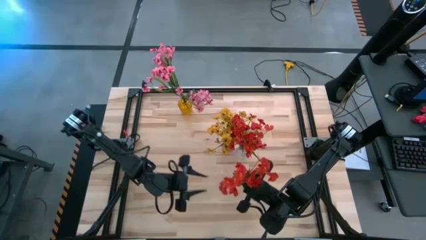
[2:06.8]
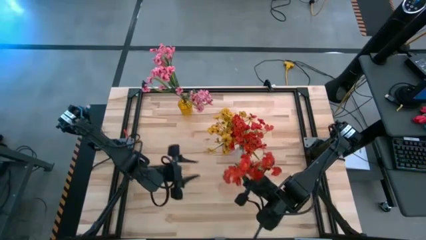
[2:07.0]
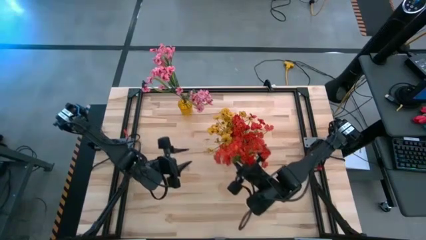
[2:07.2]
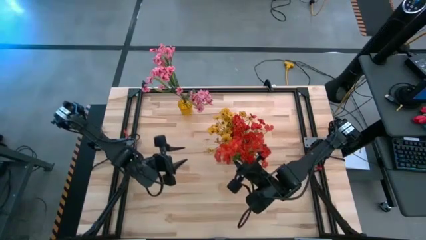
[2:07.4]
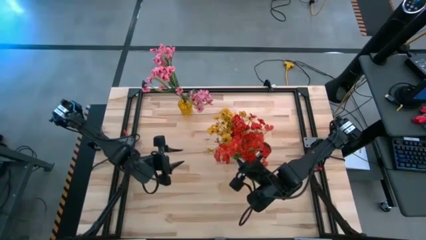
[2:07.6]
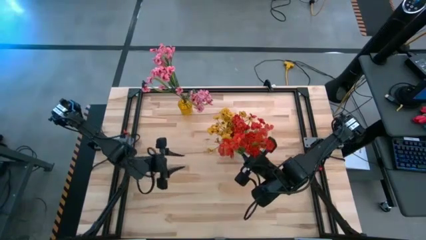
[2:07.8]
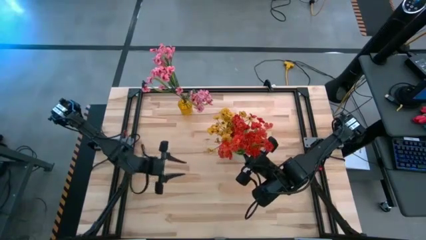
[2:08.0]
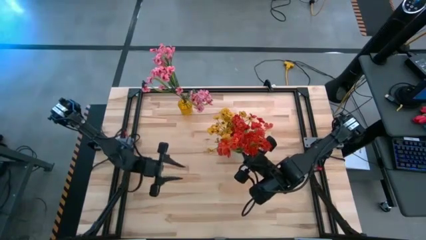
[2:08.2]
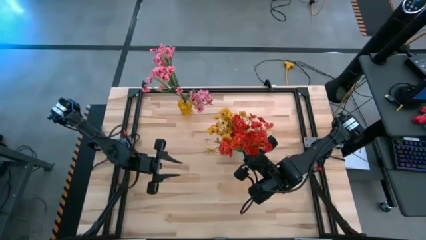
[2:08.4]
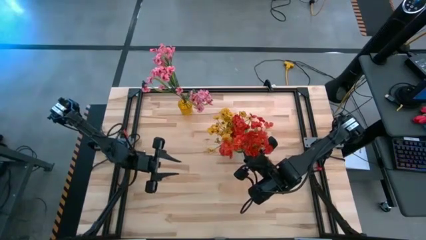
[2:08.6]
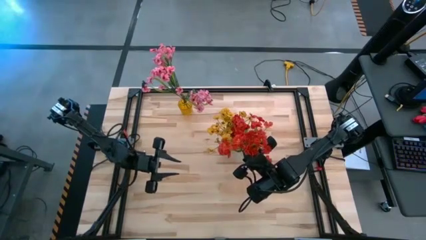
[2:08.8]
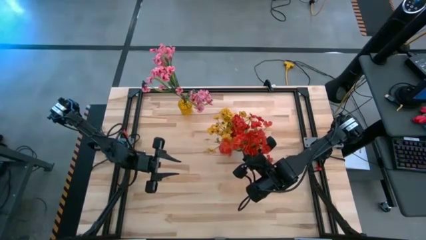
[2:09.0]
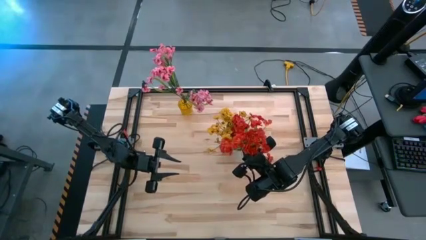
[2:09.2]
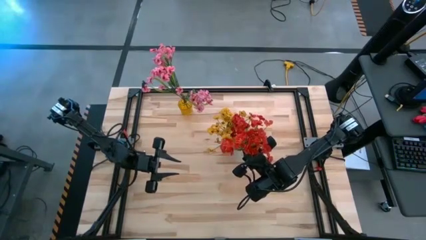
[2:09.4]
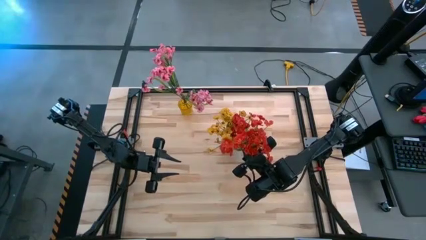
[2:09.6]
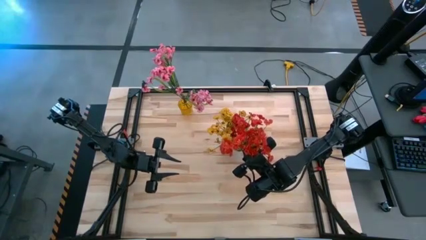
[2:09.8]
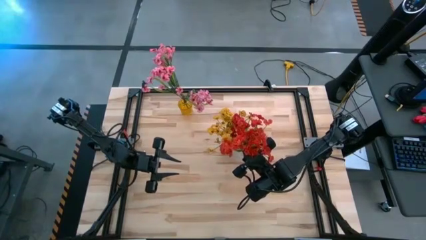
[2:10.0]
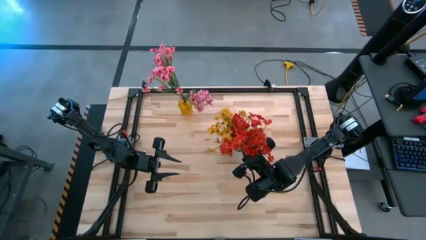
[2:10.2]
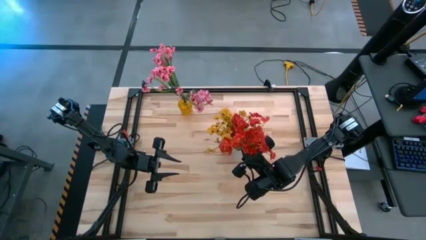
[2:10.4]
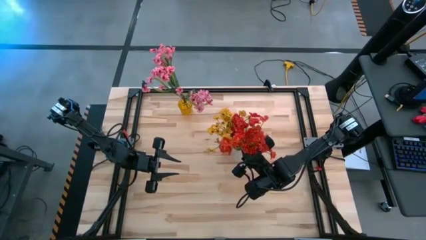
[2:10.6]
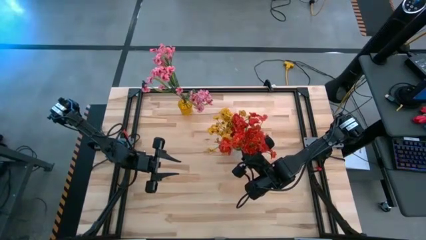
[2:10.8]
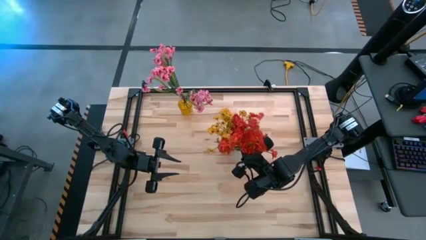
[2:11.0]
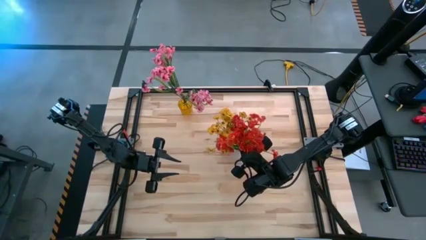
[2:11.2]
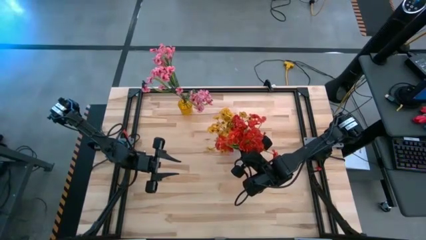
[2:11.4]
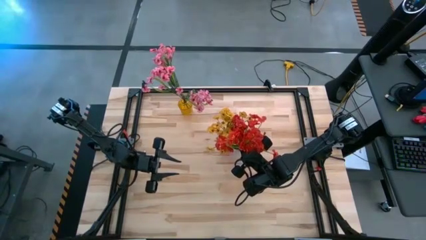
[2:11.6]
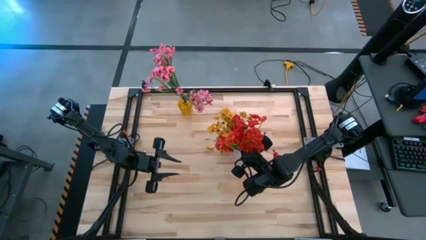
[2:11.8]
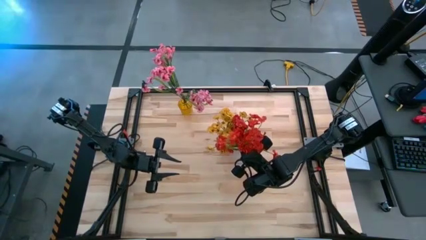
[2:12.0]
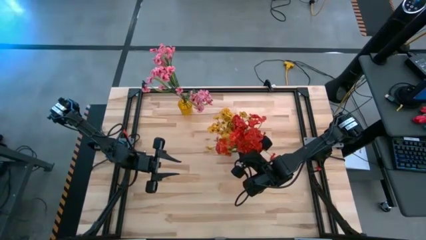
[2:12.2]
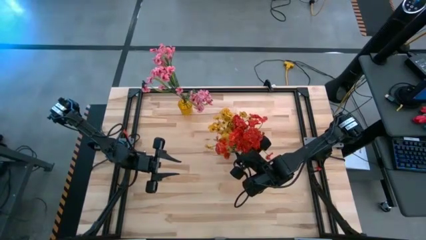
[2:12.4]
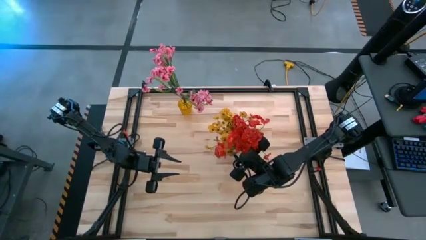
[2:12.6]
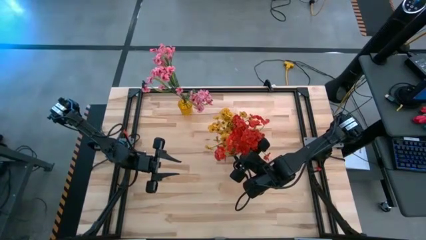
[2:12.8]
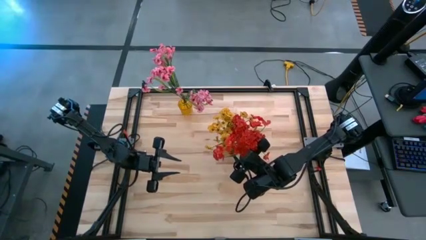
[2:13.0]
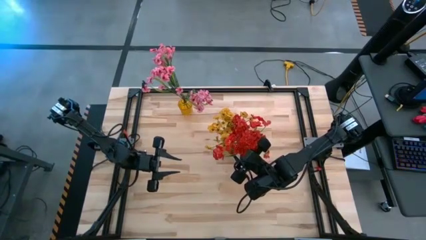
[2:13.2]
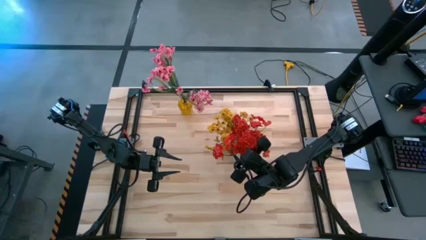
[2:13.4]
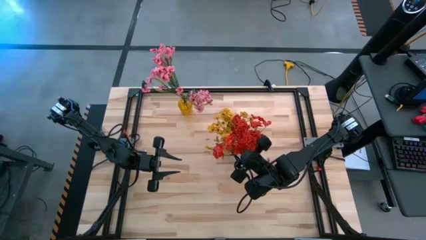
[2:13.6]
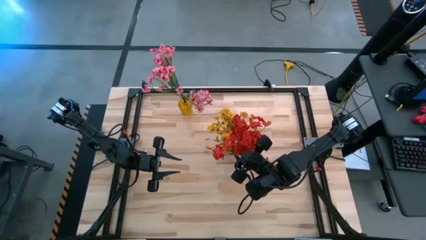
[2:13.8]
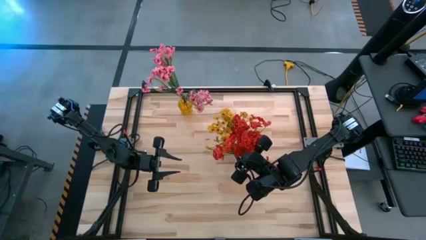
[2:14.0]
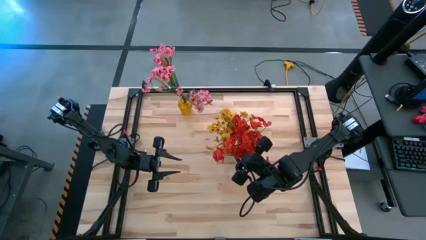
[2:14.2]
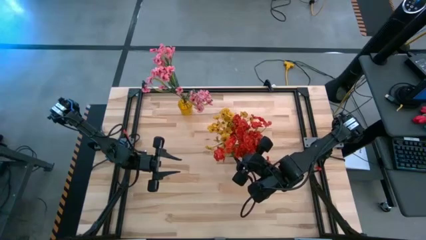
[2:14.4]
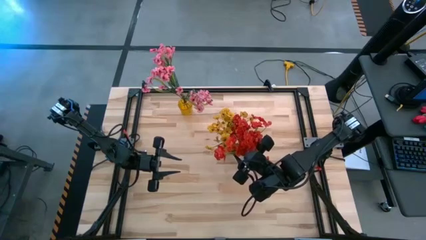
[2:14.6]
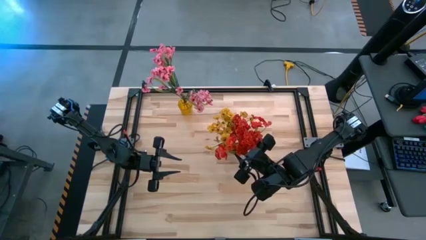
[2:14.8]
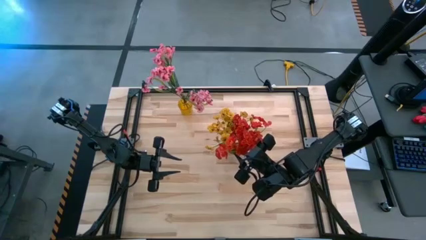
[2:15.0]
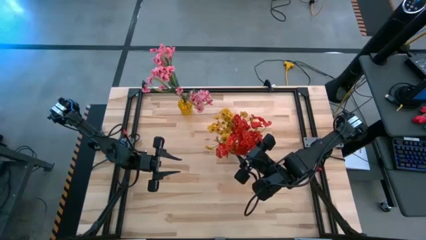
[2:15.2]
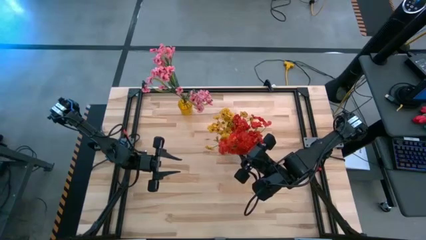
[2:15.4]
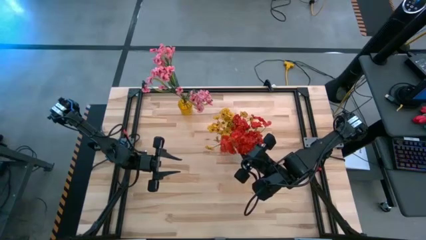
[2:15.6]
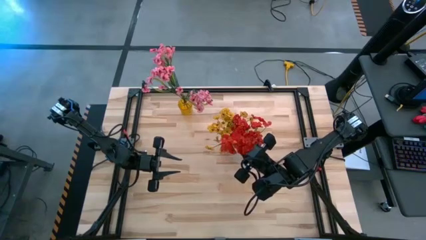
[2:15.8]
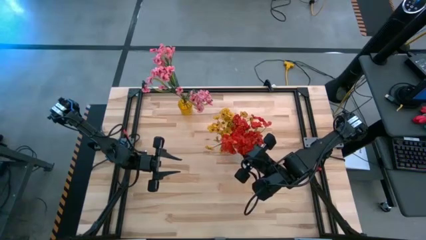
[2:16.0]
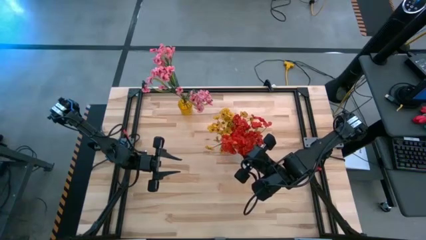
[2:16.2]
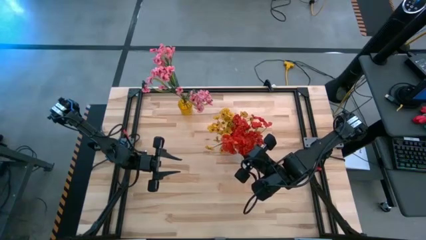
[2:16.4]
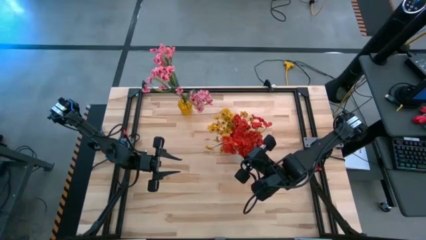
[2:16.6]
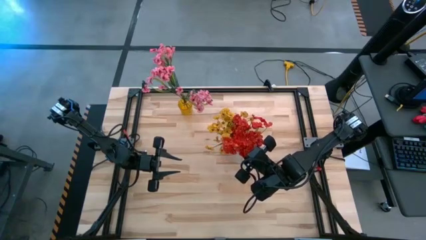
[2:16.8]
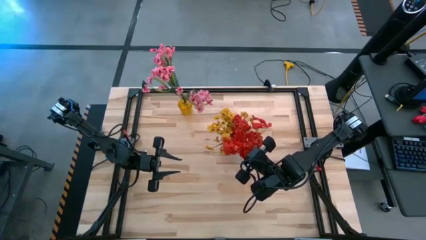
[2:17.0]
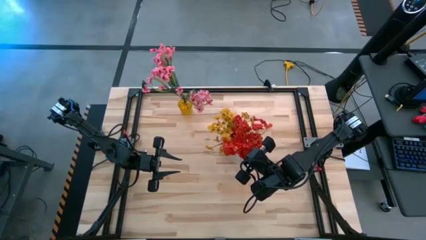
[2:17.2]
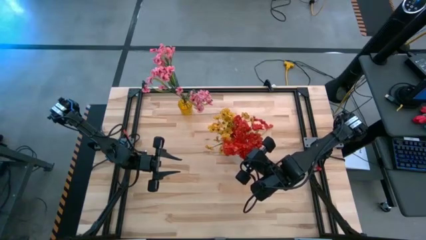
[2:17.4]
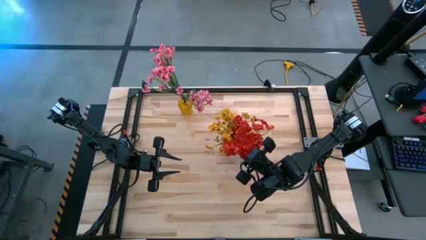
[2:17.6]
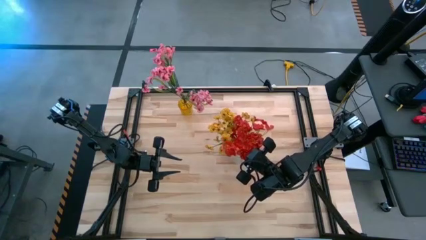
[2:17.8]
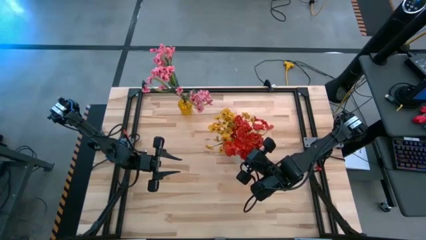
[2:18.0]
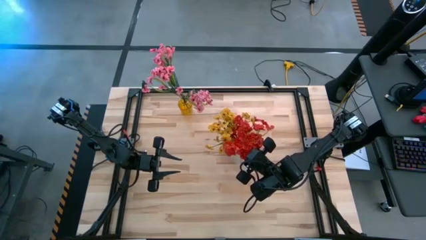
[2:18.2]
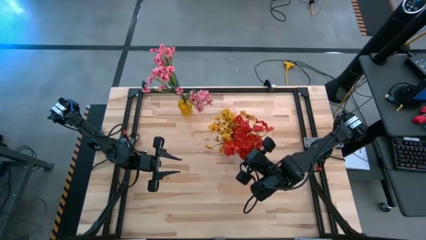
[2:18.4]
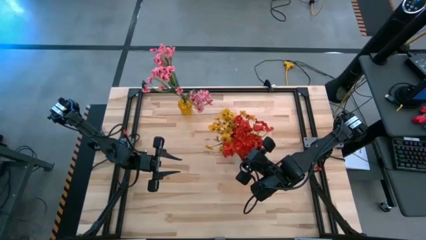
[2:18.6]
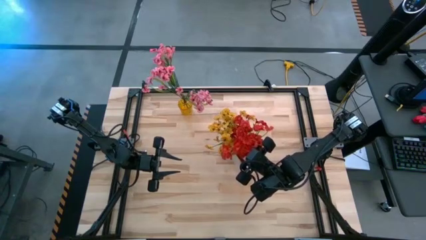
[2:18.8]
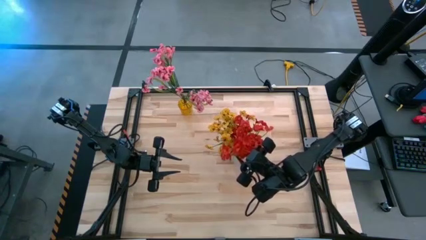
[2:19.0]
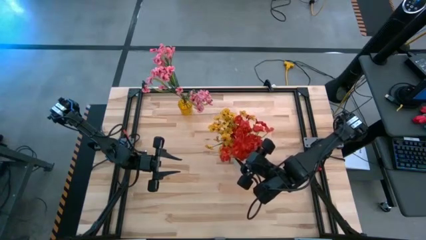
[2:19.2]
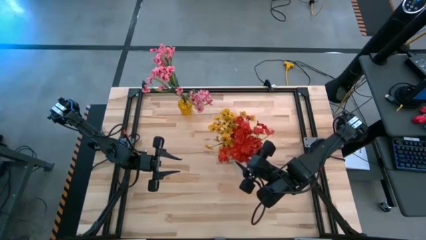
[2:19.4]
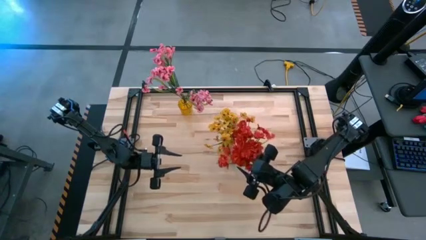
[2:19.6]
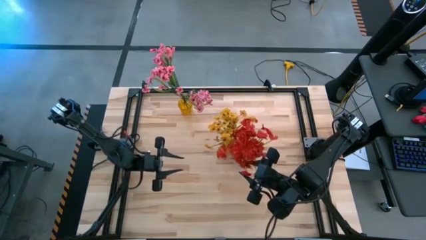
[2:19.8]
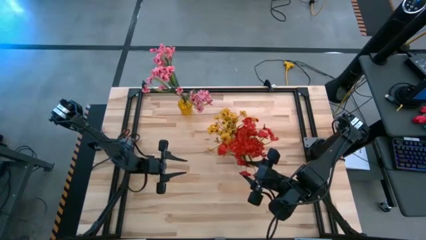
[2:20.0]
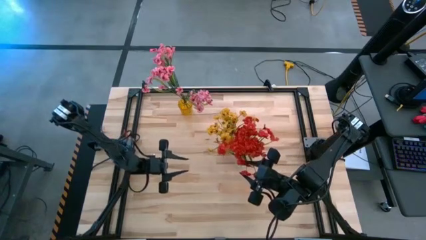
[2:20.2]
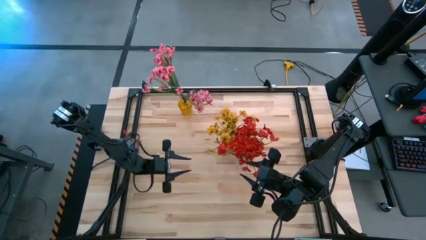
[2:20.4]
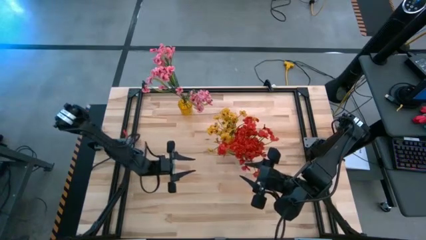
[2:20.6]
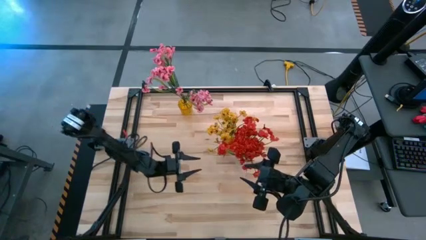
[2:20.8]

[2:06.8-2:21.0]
Task: Sort flowers into vase by color
Put the red flowers into the transparent vase

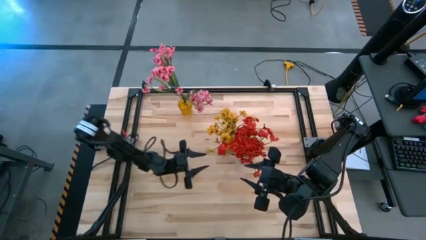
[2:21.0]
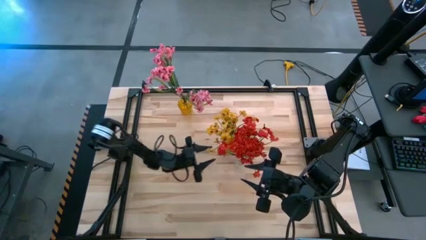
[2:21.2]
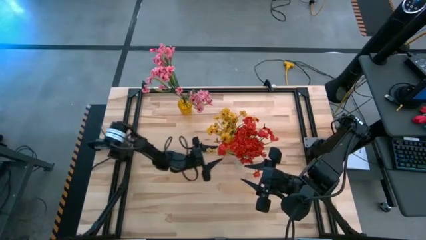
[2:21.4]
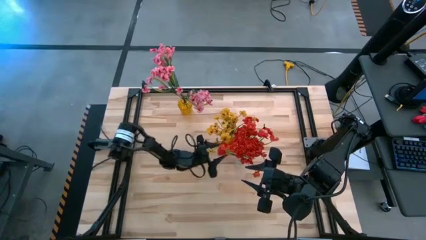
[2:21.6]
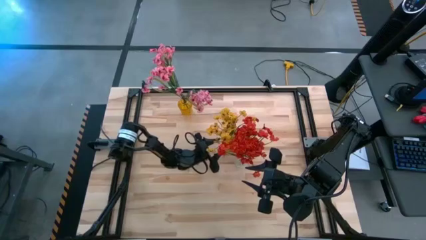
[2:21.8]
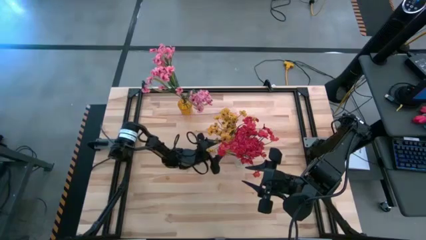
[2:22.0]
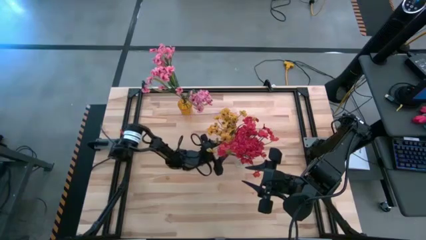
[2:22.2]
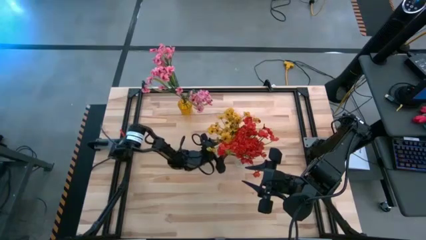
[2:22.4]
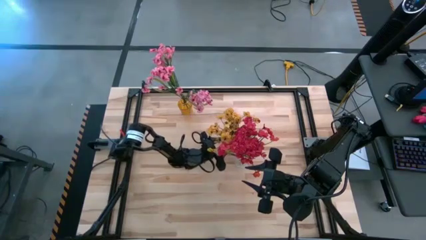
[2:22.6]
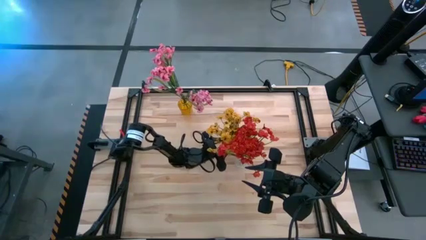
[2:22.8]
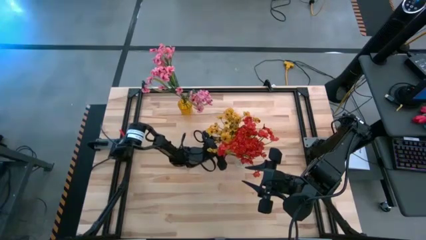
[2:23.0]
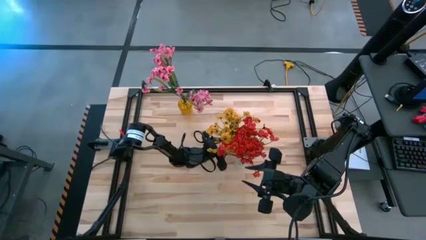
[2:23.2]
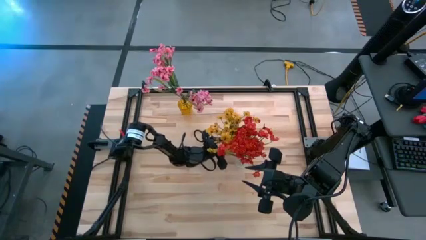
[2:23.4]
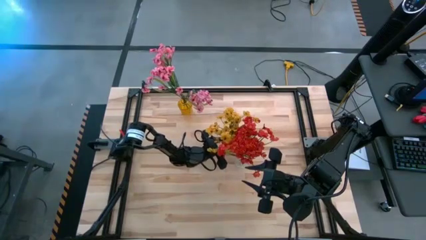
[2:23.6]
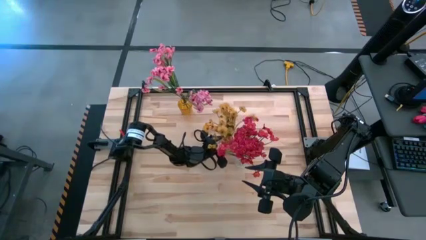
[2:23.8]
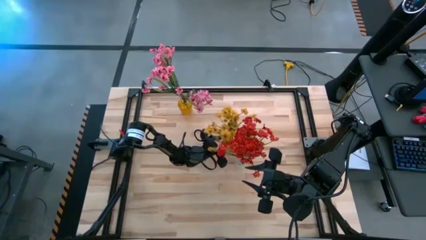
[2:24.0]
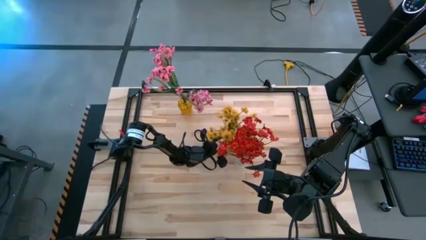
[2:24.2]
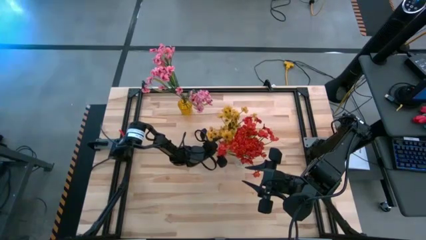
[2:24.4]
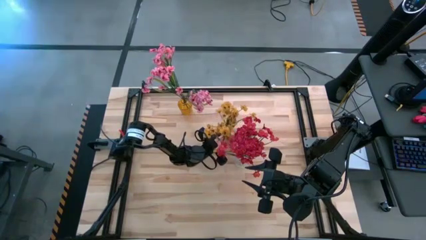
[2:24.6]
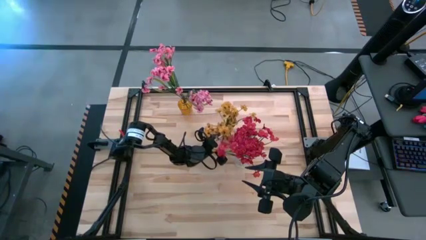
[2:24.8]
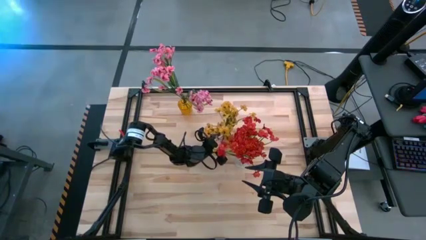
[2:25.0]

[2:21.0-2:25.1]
Adjust the violet vase
